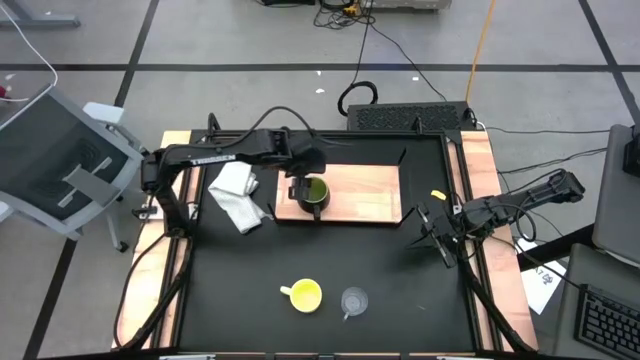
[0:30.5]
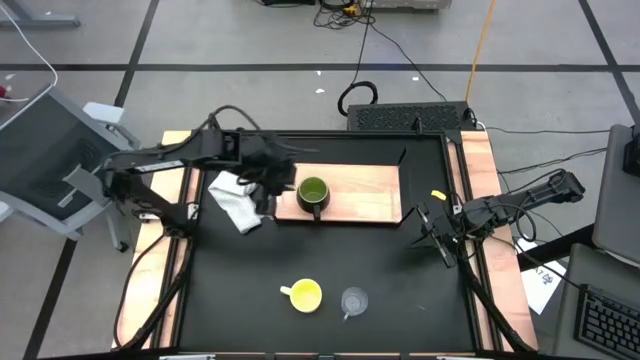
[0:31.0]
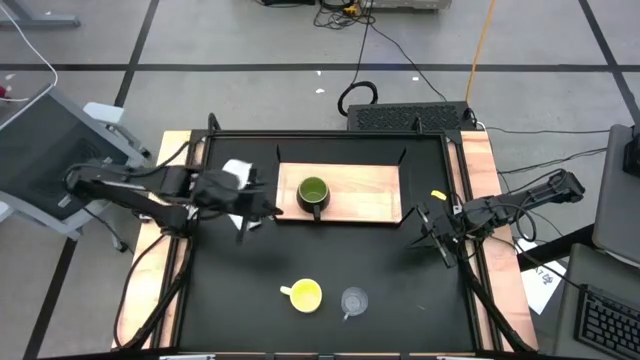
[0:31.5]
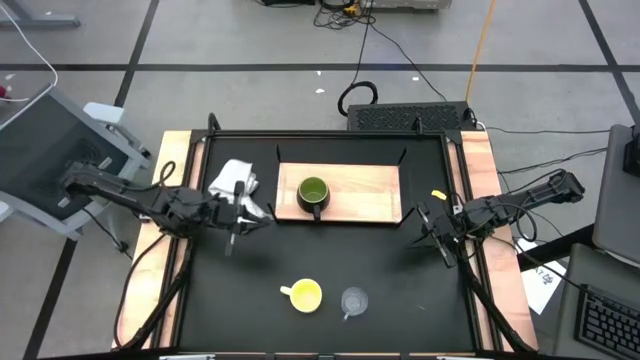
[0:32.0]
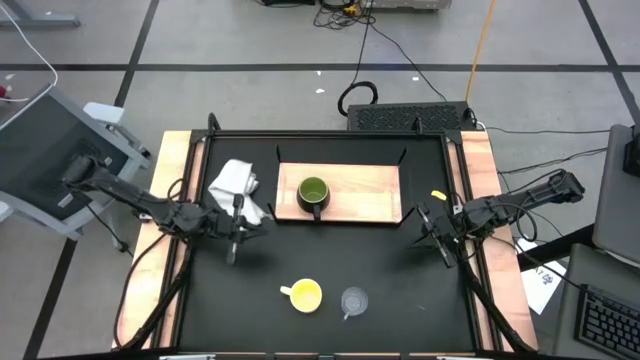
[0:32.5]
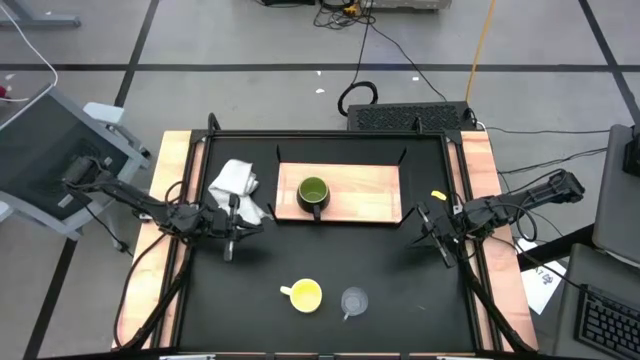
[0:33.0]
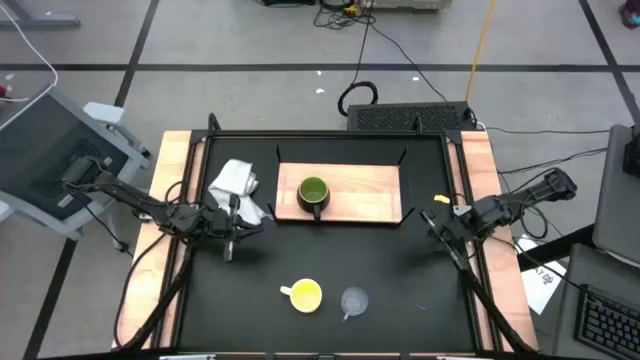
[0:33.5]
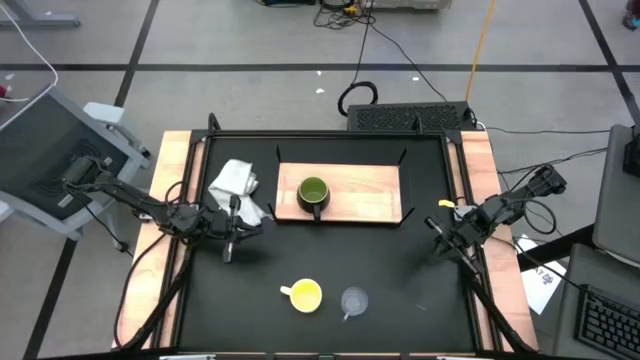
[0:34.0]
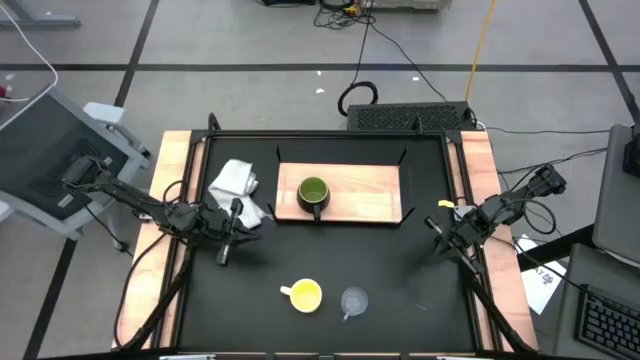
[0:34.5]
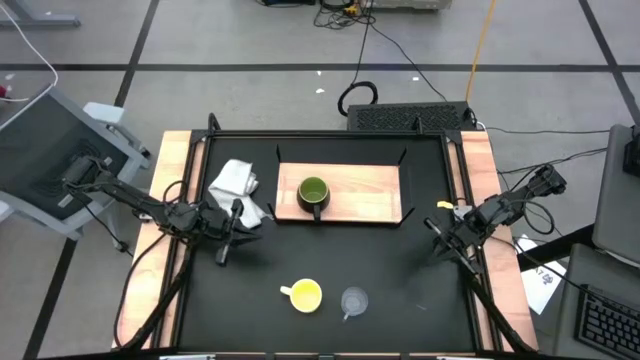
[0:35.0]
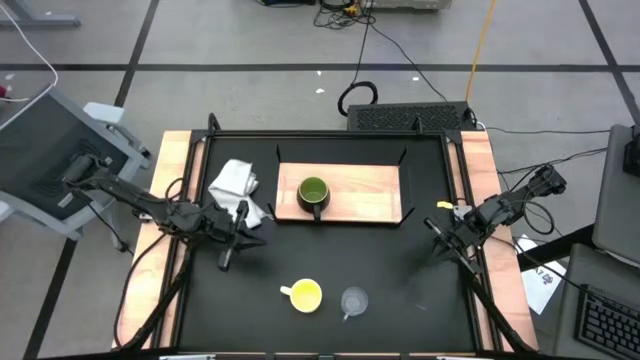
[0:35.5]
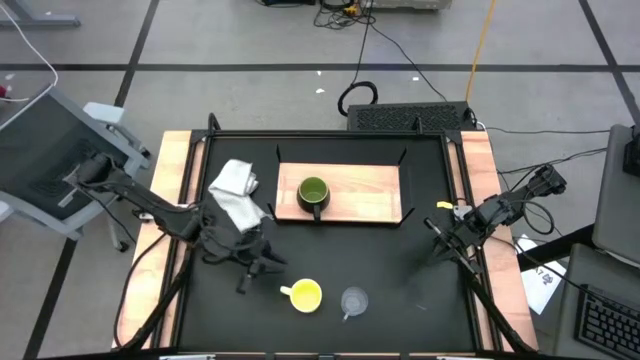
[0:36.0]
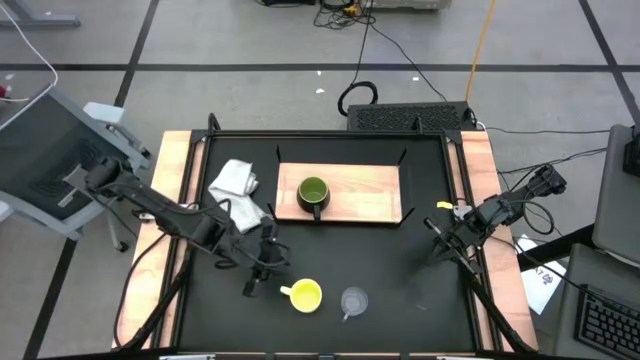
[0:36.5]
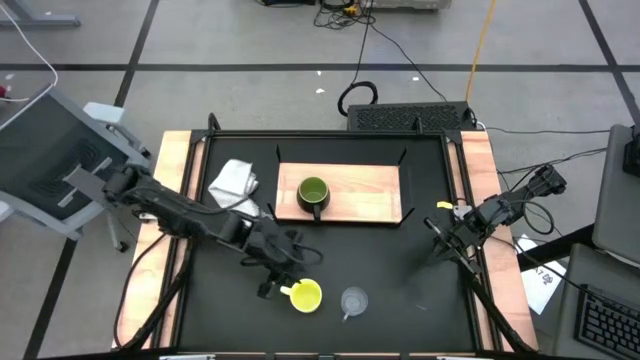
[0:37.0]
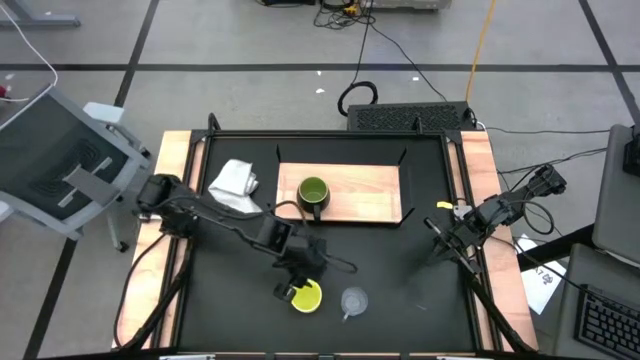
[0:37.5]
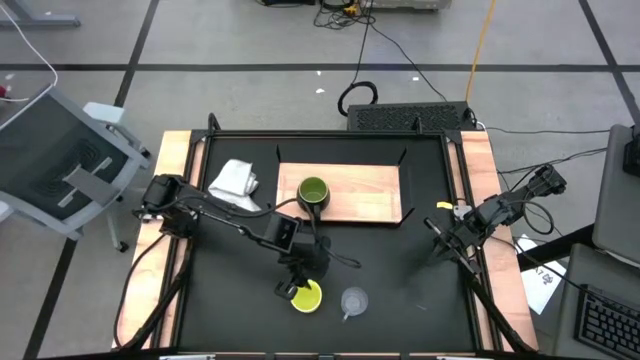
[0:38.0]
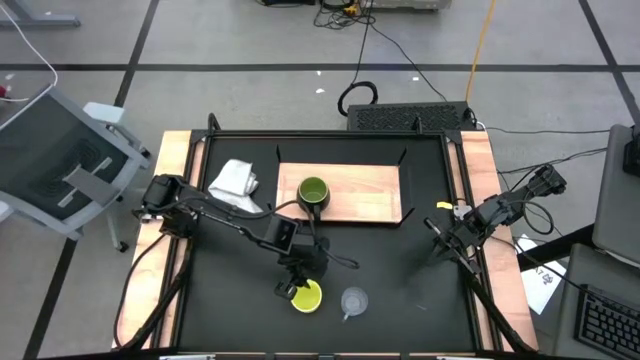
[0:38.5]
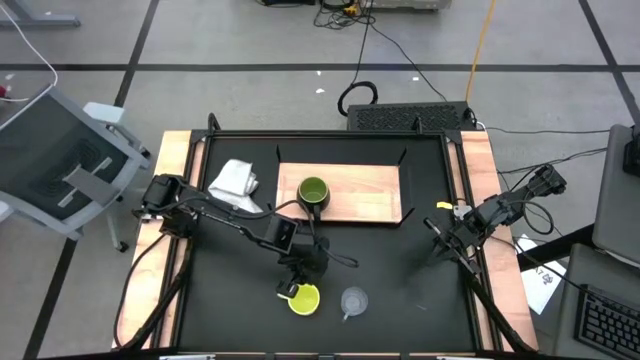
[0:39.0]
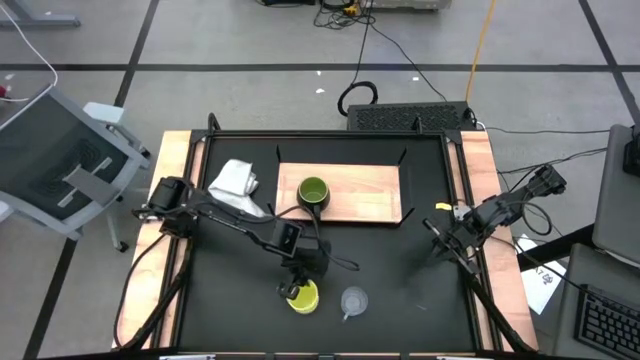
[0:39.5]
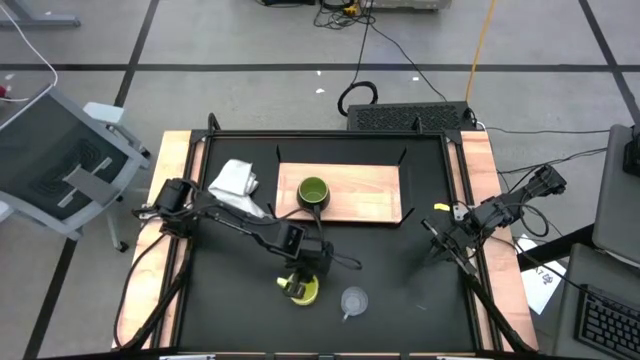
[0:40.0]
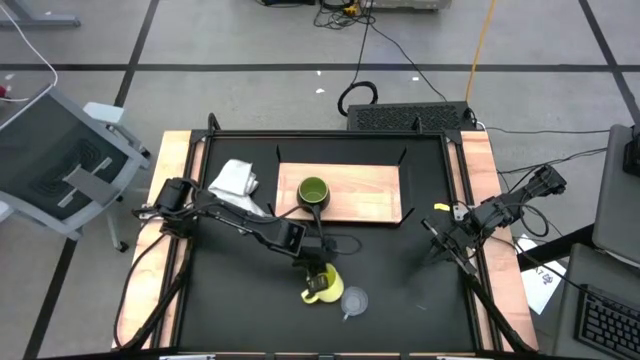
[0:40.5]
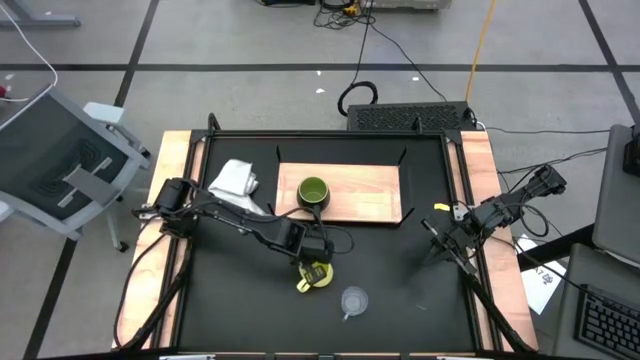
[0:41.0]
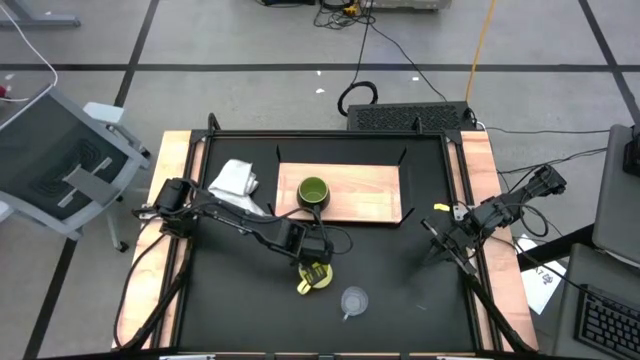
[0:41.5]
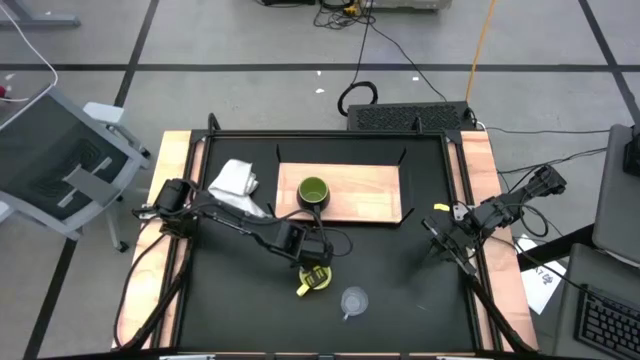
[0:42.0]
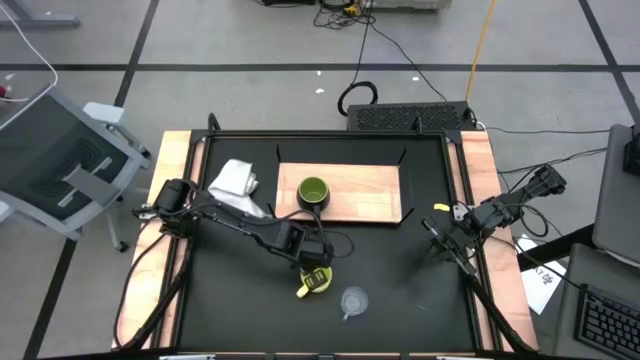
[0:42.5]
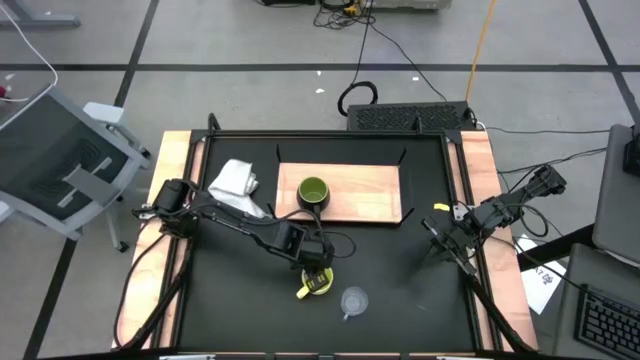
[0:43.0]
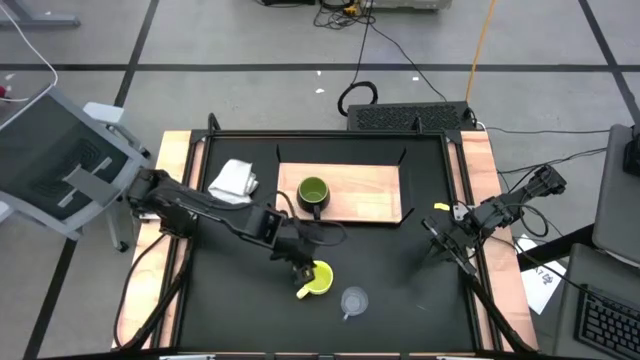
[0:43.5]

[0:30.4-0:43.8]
Task: Stack small to large cups/mugs on shelf
Put the yellow mug on the shelf

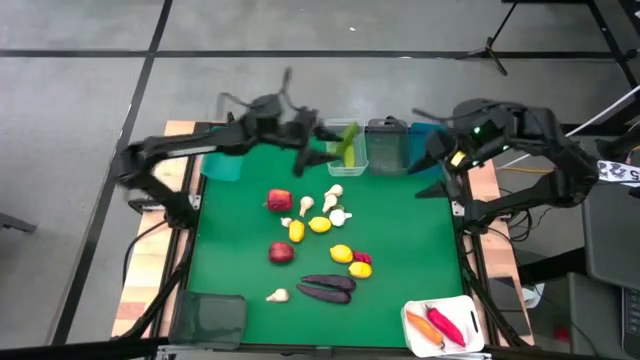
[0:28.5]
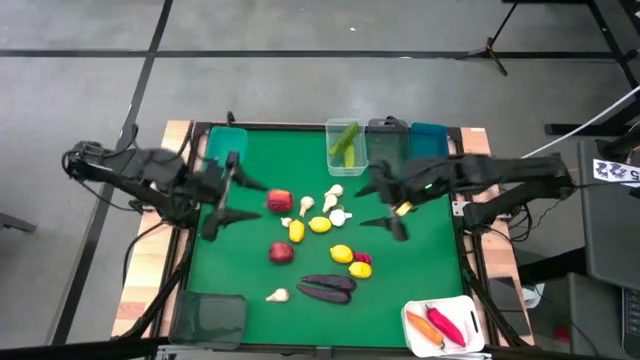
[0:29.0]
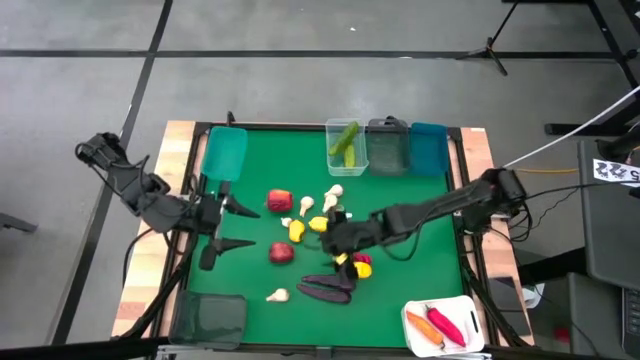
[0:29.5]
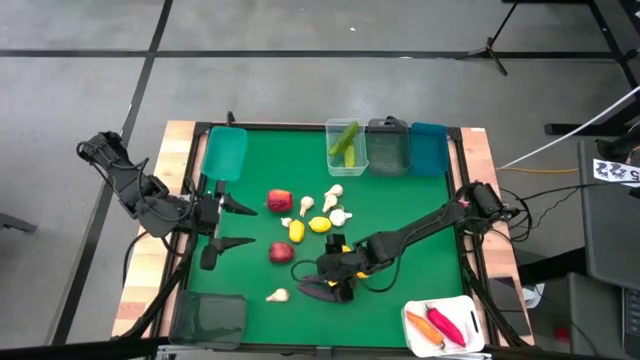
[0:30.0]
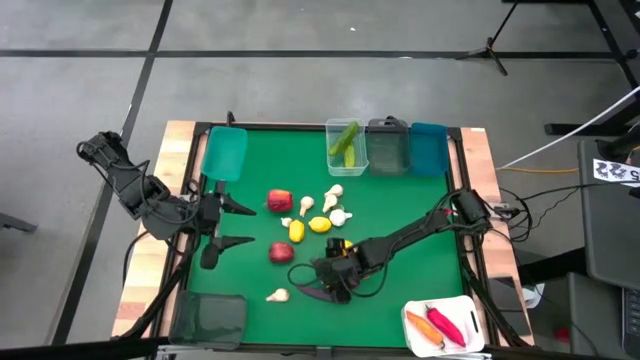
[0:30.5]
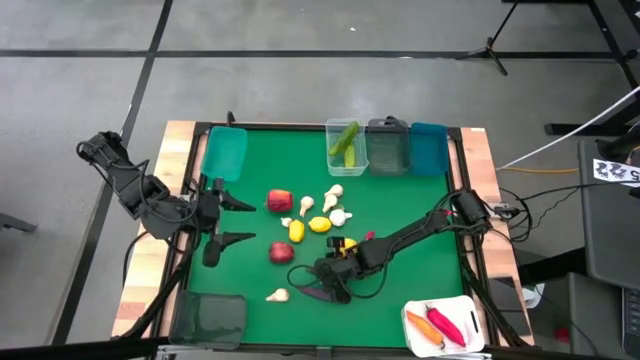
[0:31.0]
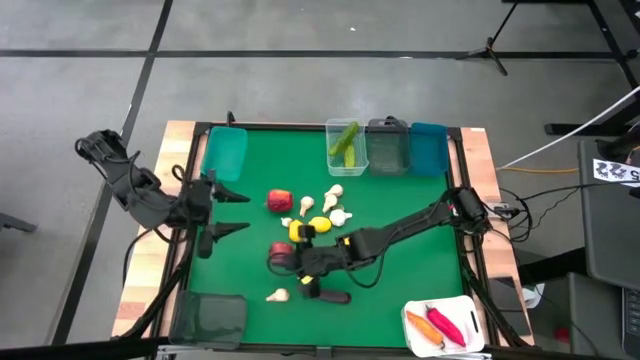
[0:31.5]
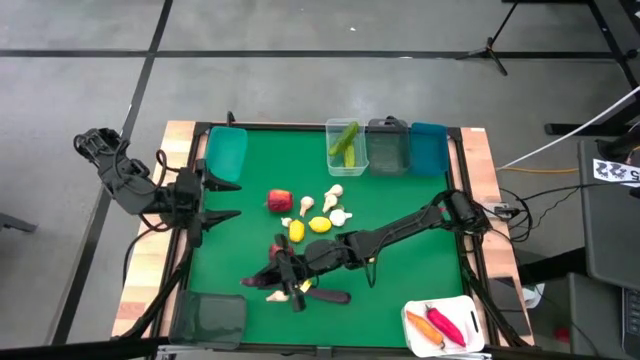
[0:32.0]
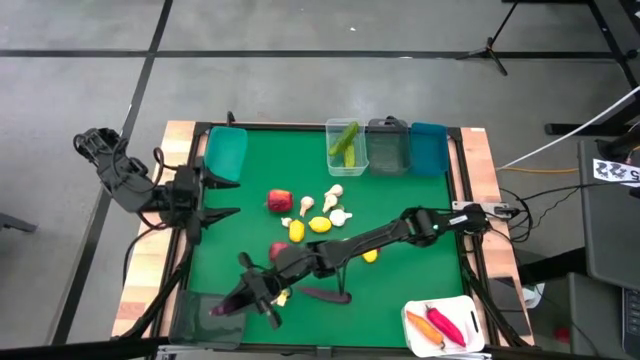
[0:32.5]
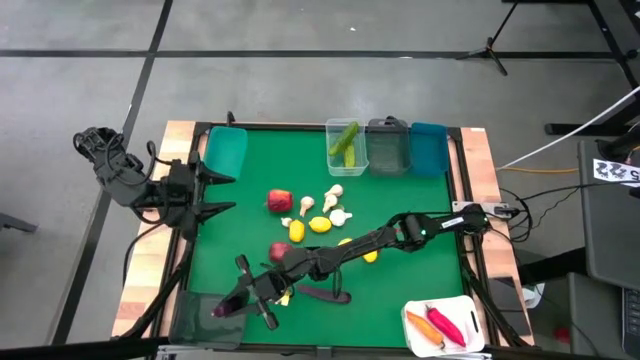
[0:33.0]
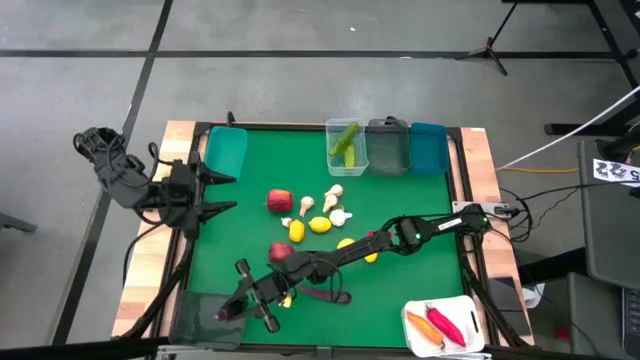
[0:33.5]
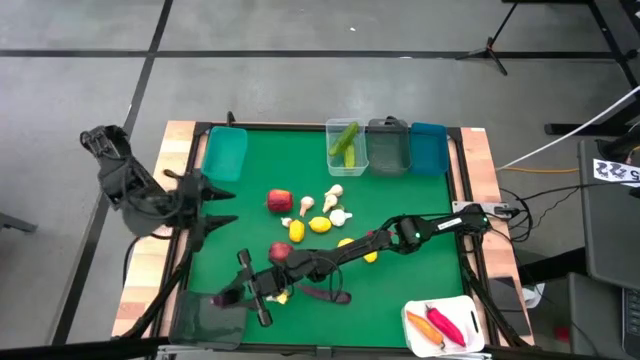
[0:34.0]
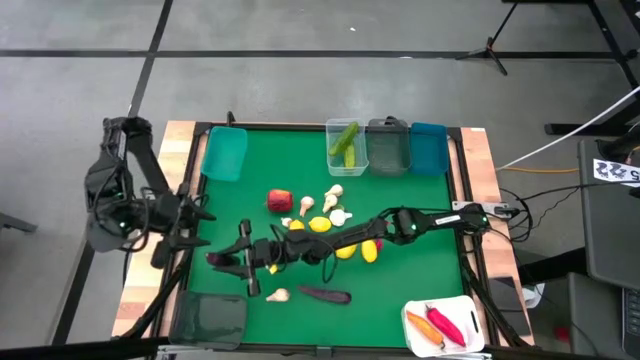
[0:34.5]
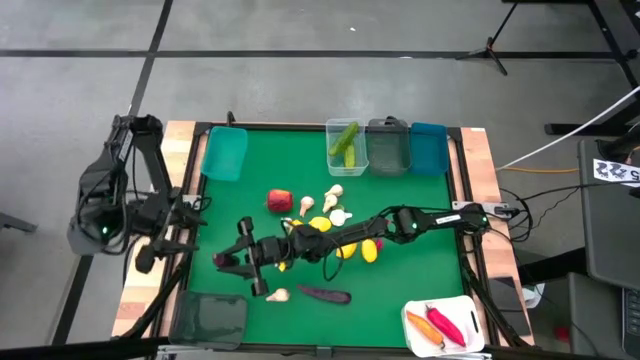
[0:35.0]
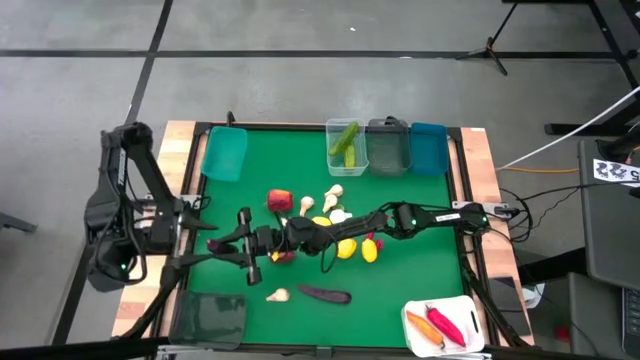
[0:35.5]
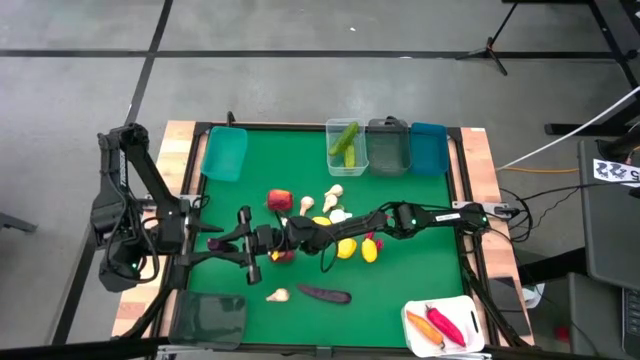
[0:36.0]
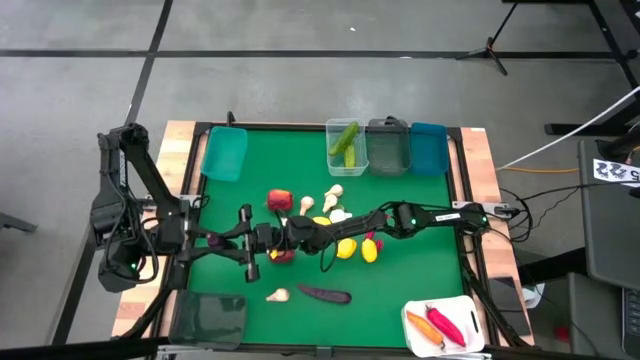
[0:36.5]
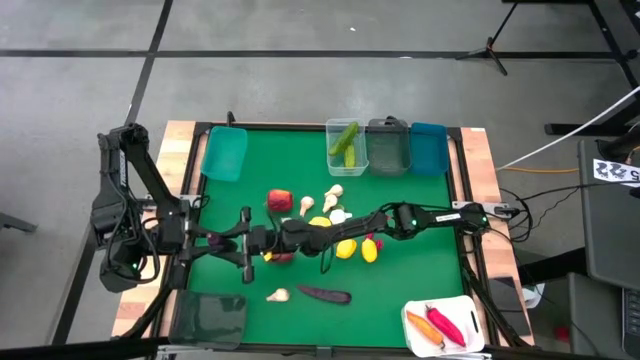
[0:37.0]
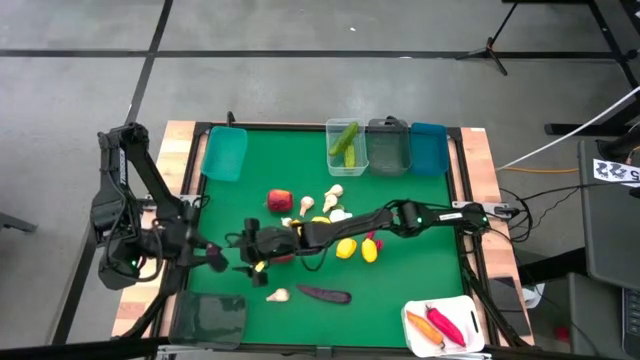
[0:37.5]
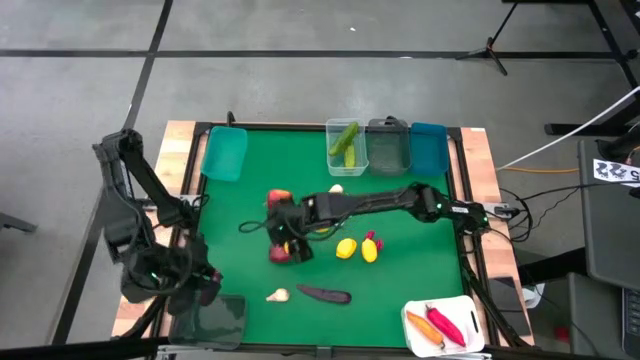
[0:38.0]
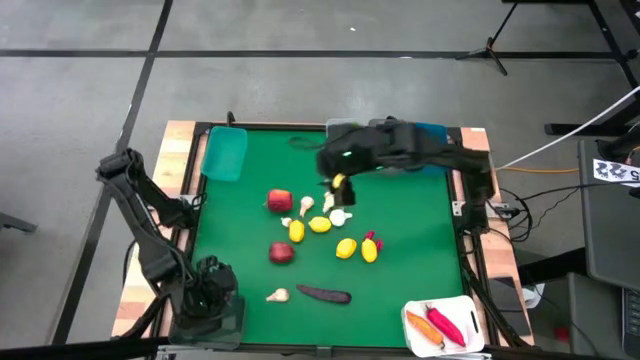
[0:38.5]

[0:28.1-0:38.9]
Task: Sort produce into baskets
Put the violet eggplant into the bottom black transparent bin
